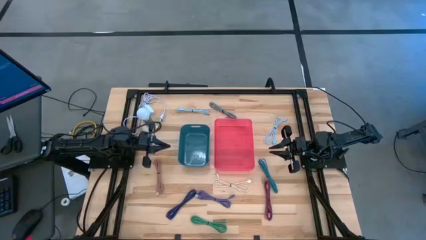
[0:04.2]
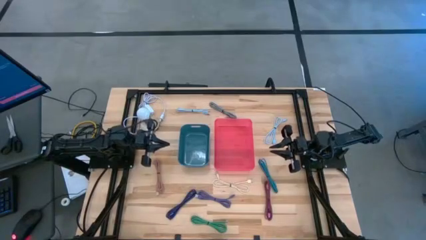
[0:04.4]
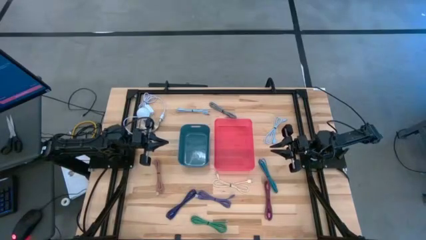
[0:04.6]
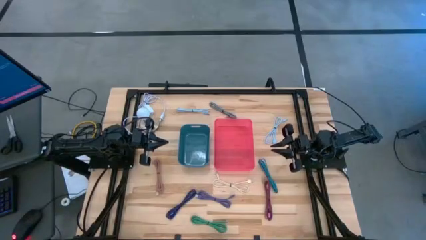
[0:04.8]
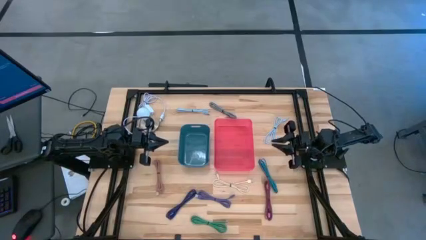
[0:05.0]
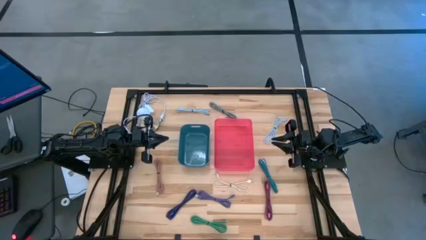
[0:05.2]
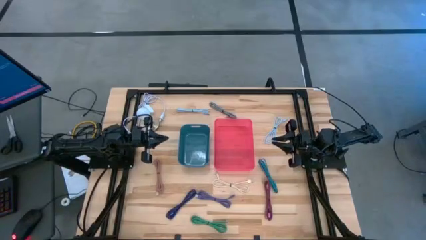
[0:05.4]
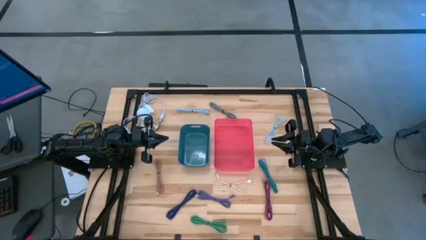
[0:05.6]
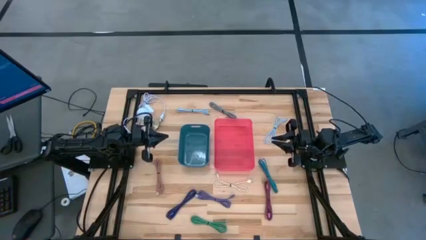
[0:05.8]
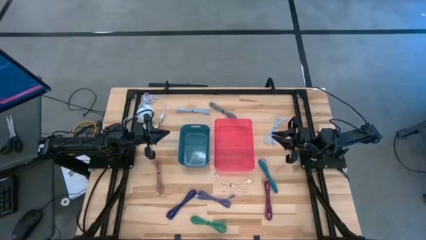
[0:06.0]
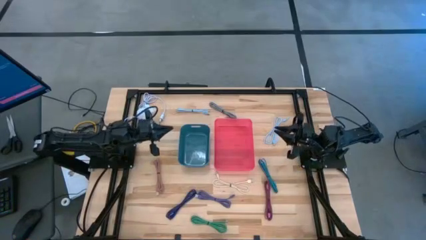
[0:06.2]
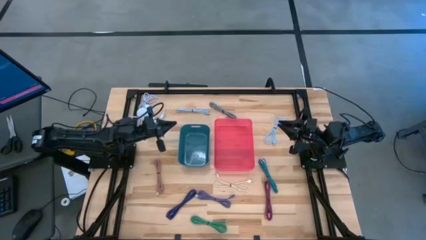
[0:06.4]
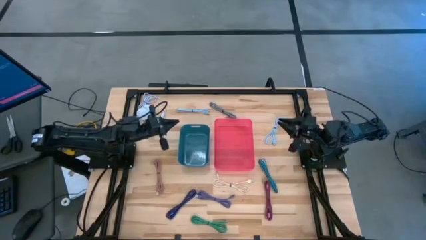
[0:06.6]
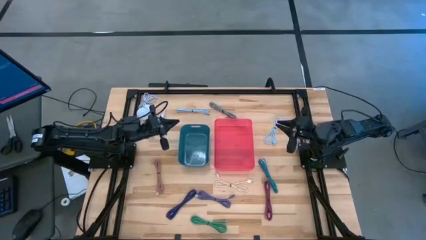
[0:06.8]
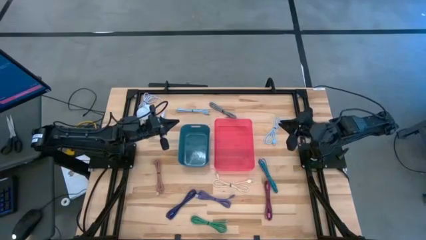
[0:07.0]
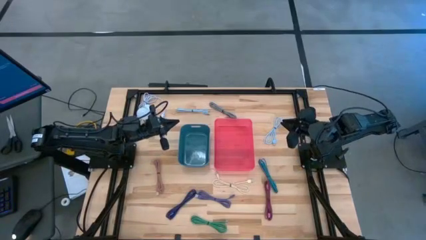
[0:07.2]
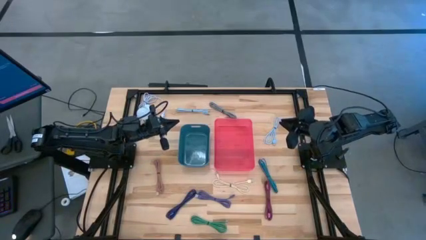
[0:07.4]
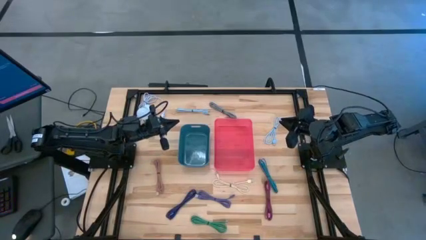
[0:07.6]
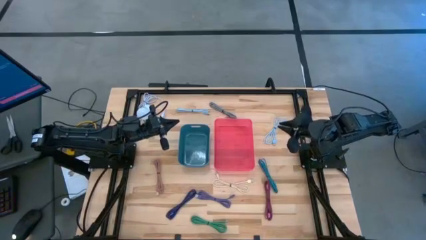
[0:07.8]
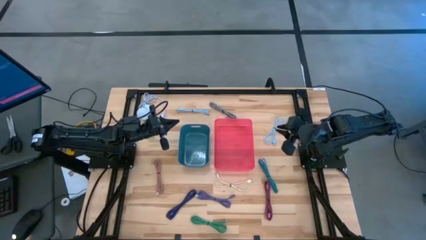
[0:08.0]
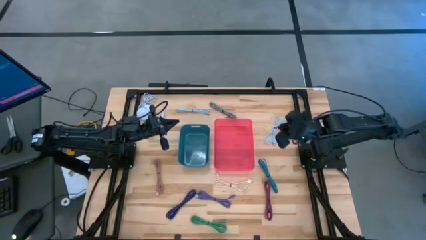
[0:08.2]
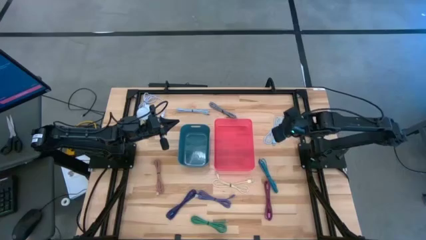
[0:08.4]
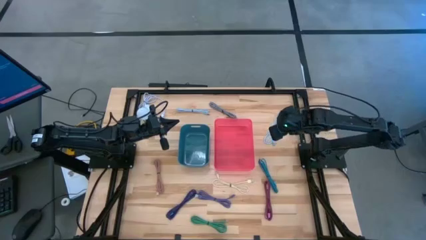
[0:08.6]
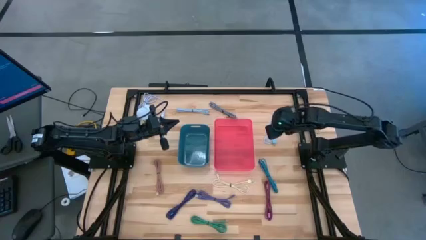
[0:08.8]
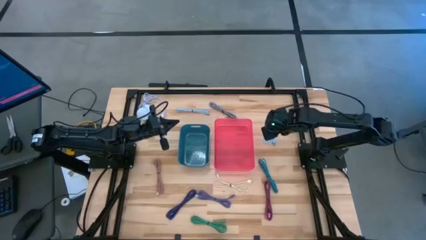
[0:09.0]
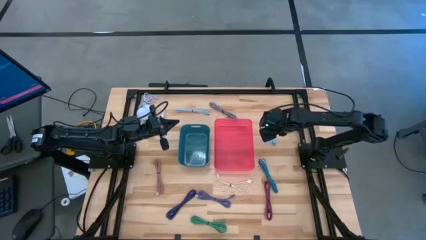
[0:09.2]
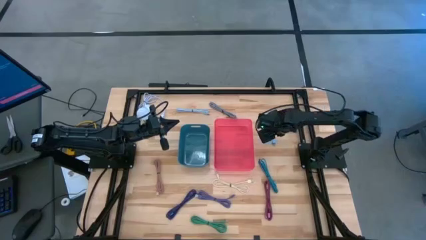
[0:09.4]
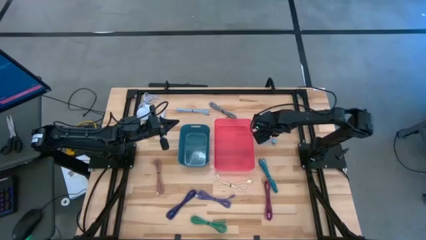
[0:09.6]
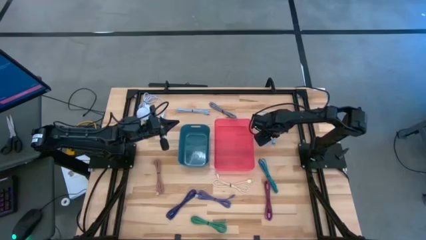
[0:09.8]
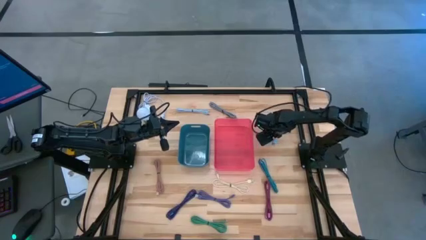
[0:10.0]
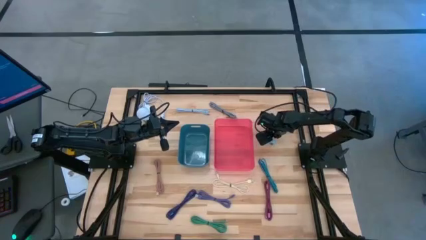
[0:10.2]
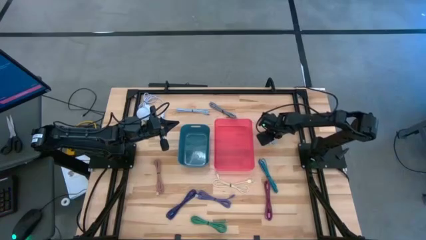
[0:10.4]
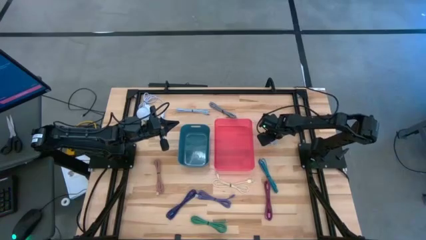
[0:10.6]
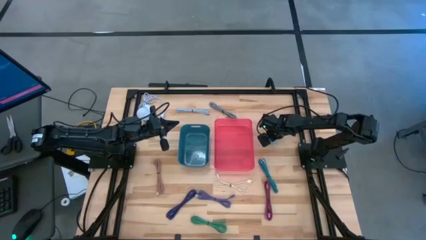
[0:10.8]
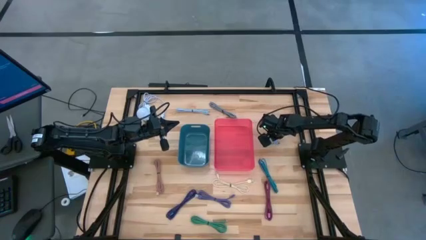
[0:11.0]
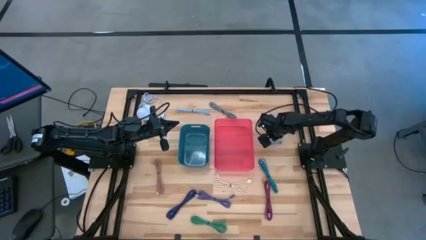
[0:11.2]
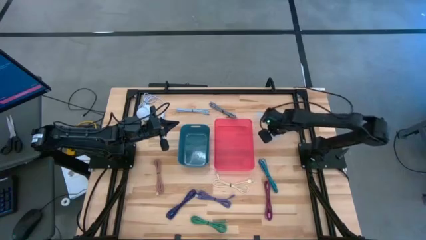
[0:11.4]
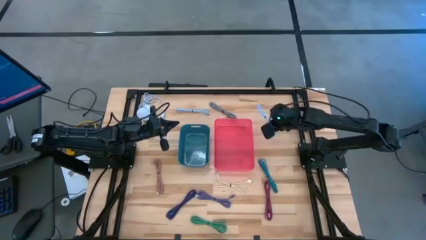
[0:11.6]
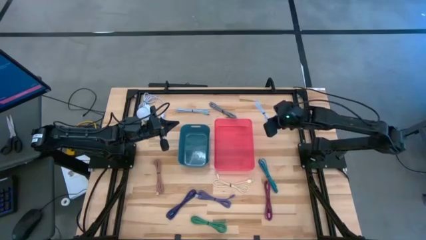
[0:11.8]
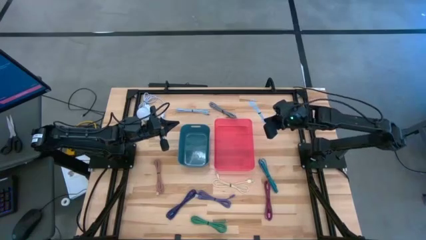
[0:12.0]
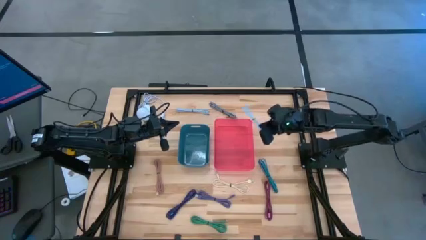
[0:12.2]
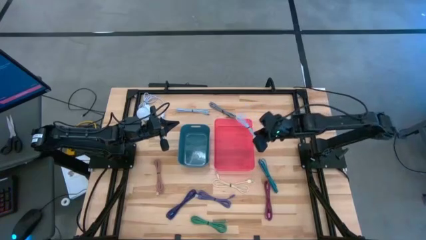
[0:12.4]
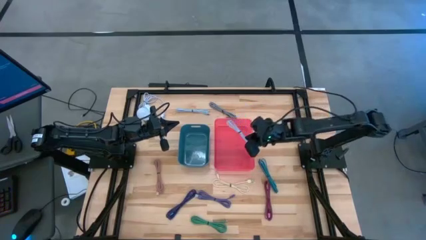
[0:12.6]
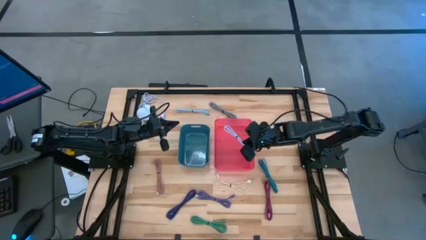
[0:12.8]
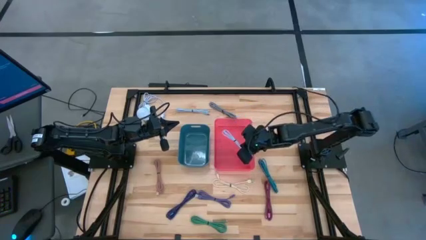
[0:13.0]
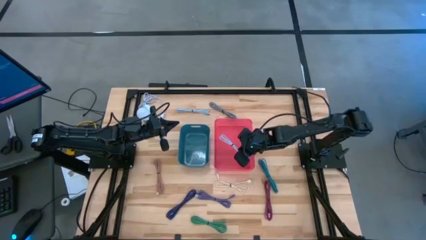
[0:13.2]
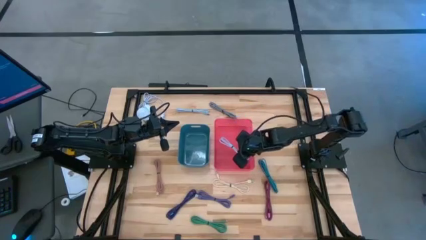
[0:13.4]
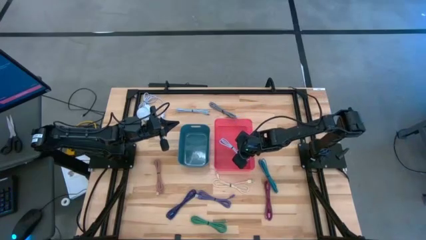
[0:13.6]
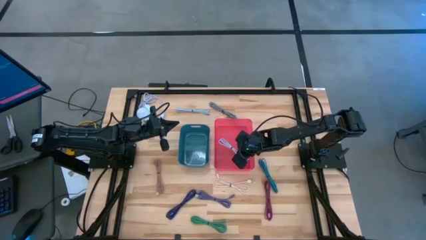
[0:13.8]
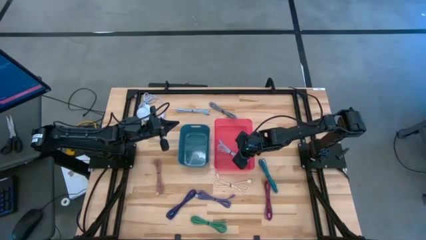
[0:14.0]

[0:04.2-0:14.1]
Task: Pick & Place USB Port
Put the right white charger cable into the red bin

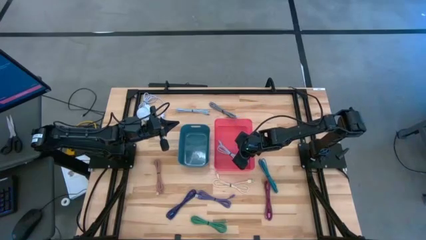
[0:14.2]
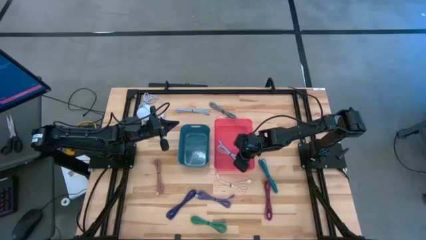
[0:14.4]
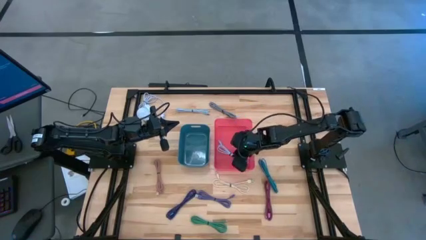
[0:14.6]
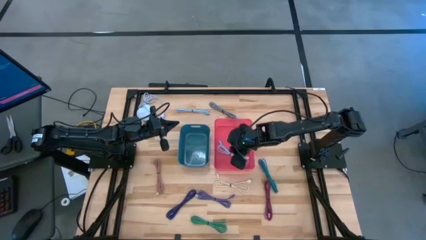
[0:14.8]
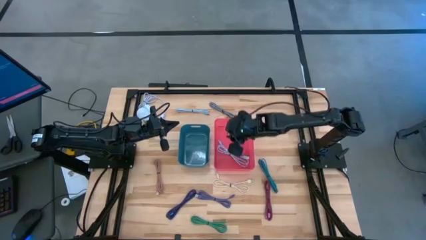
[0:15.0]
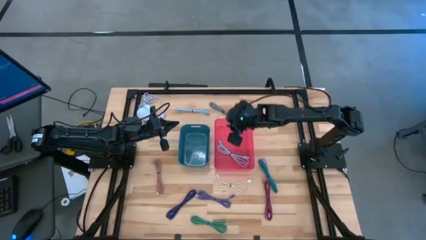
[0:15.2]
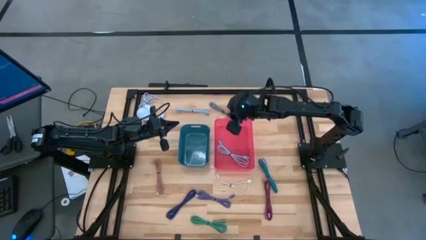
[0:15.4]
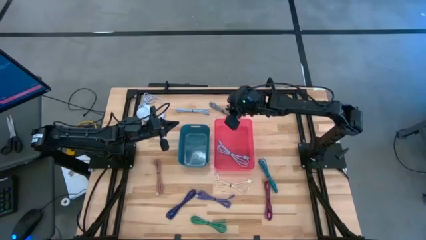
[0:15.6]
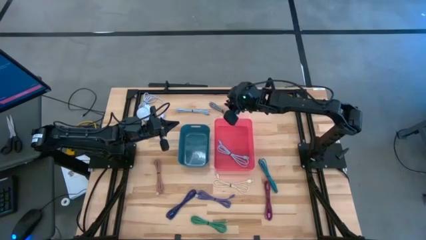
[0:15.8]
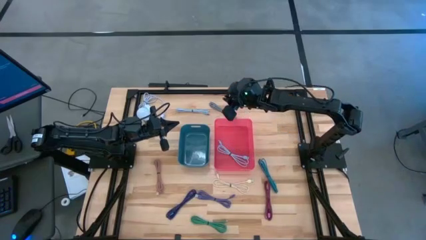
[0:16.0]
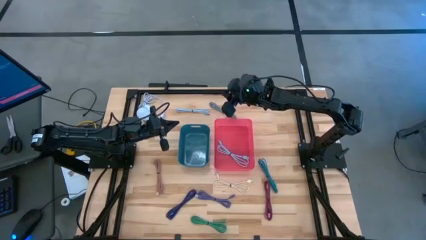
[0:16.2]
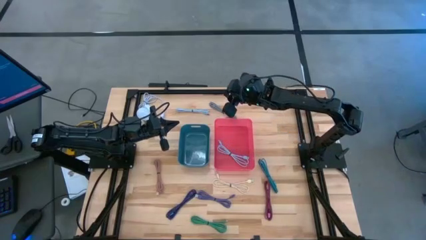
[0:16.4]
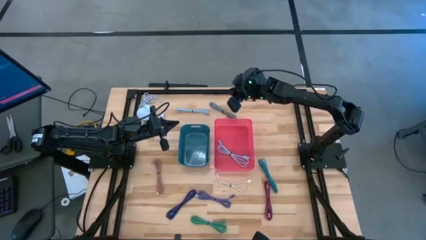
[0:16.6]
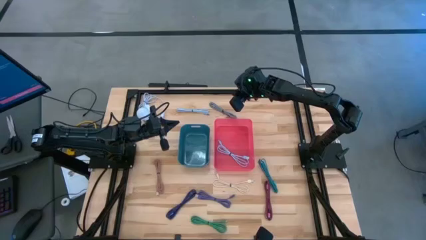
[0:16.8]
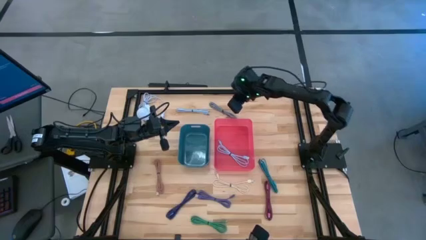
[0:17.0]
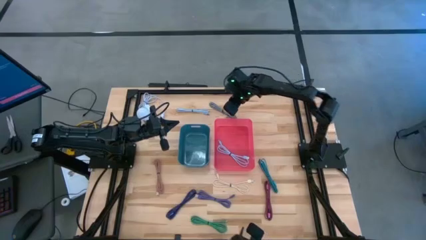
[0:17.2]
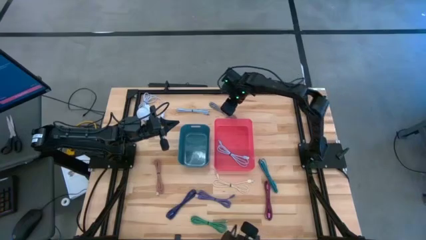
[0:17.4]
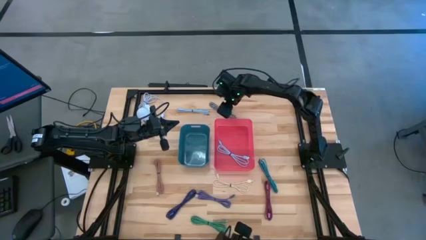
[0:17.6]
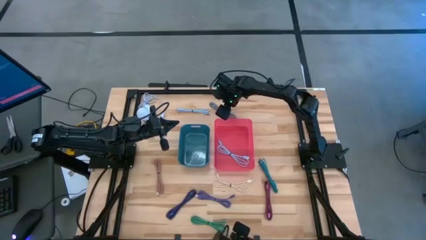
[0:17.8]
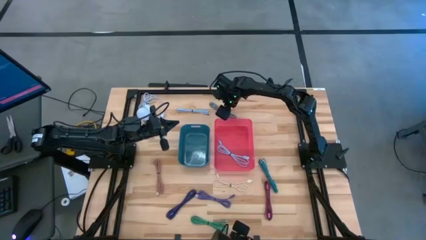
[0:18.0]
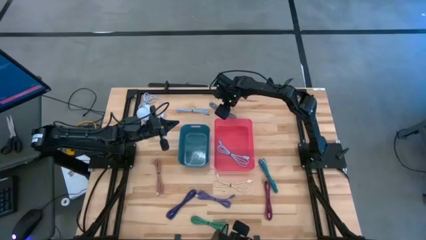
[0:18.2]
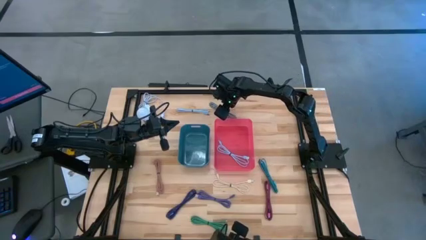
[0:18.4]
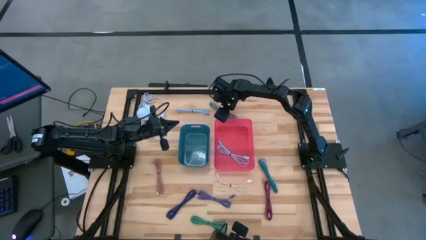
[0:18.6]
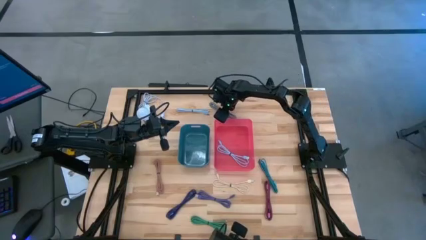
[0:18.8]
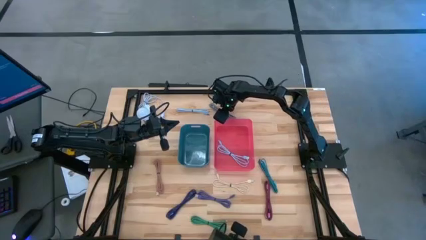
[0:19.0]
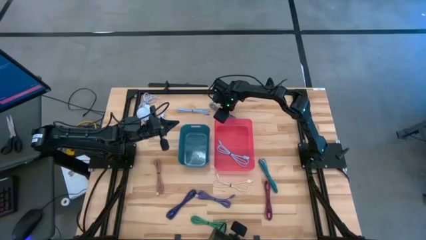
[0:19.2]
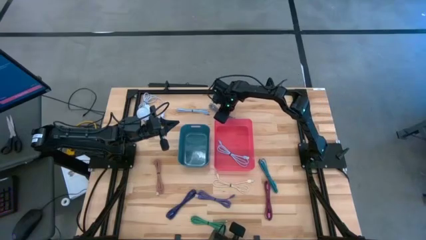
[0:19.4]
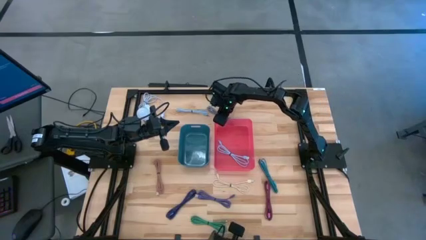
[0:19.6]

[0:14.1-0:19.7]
Put the patterned white charger cable into the blue bin
